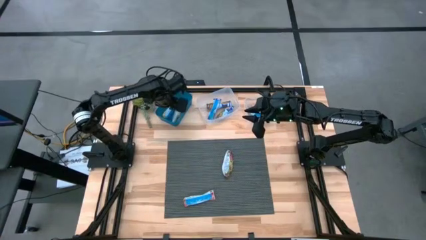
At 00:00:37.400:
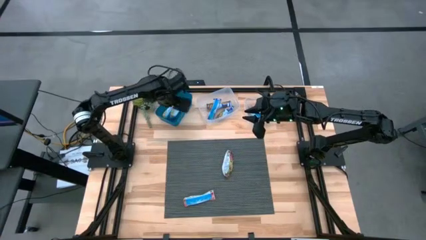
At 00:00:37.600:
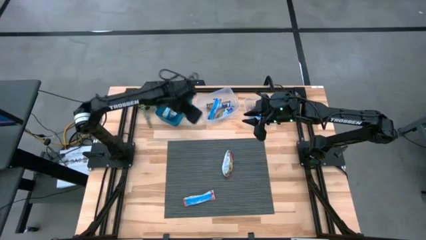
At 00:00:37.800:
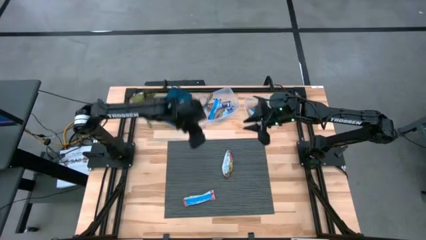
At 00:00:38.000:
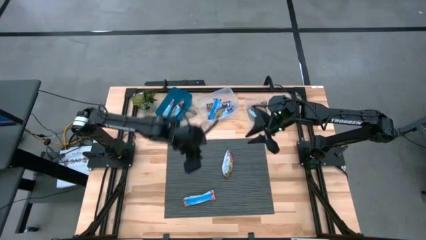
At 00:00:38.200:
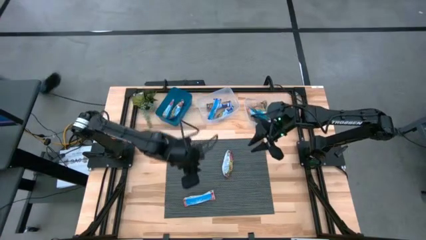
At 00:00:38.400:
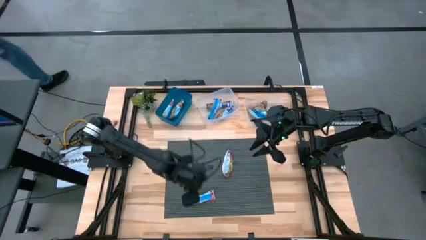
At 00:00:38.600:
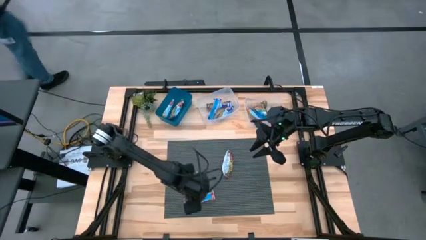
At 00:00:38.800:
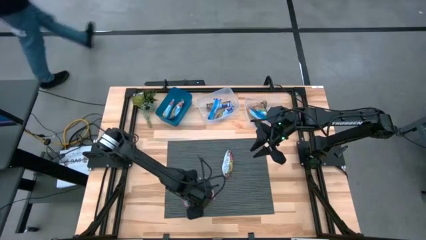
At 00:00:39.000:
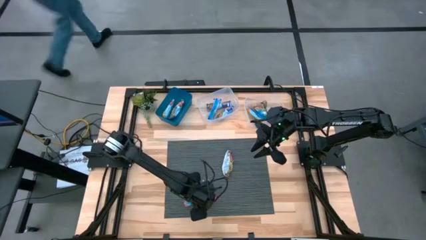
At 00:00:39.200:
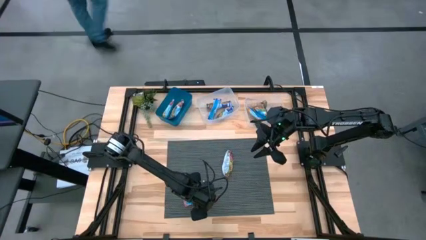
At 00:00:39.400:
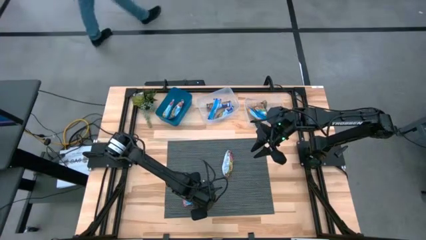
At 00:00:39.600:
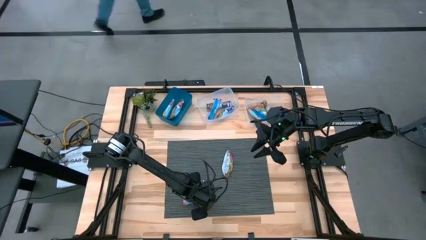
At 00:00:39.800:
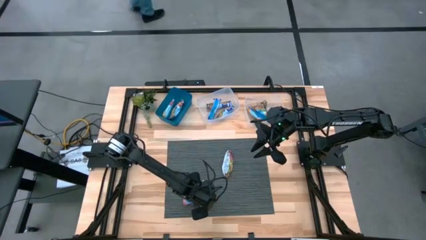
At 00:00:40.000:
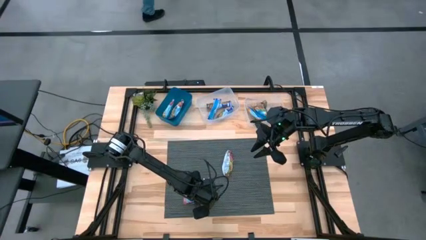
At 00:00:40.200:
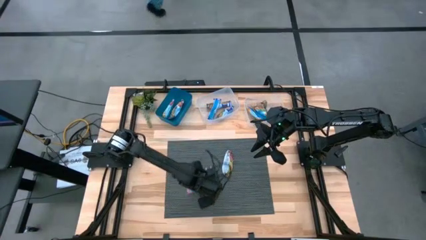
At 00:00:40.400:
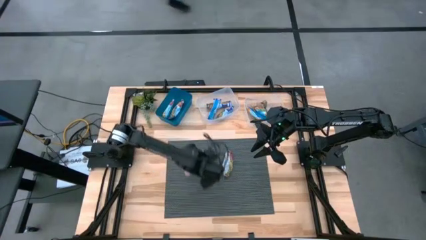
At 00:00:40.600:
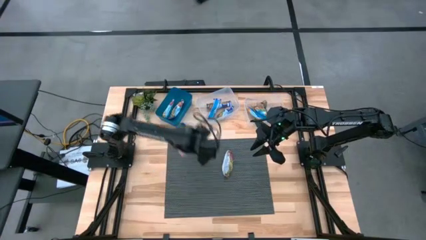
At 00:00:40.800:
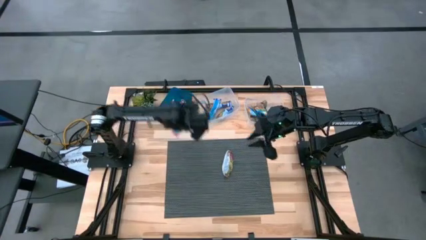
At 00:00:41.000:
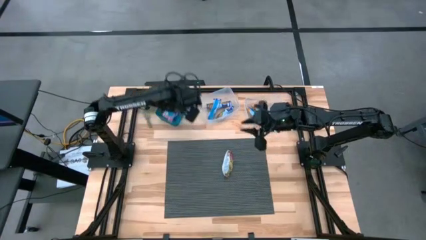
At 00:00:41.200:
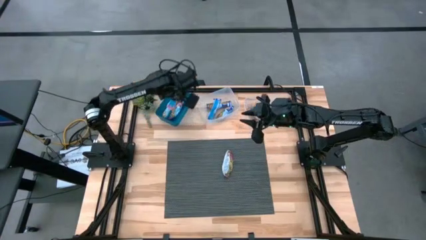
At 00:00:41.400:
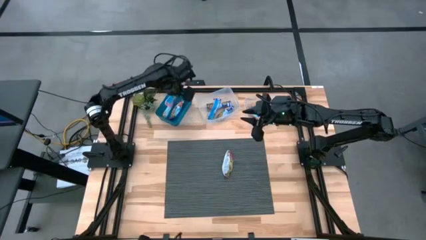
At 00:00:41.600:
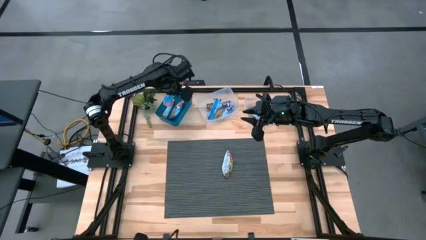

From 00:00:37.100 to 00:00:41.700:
Task: Pick and place Granola Bars by type
Put the red granola bar into the blue bin

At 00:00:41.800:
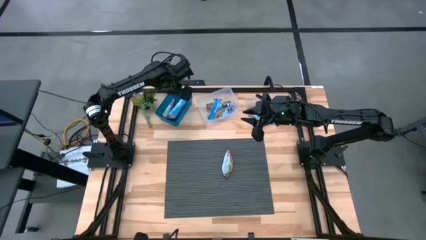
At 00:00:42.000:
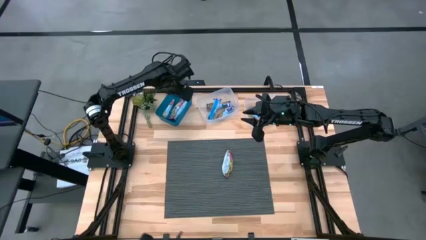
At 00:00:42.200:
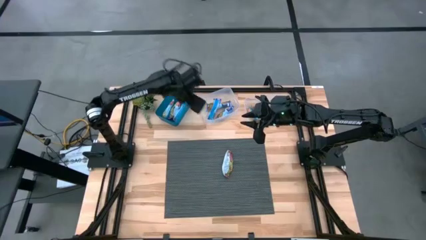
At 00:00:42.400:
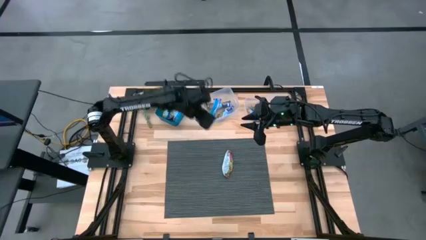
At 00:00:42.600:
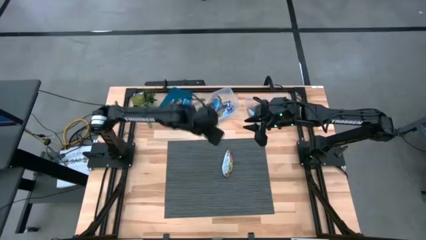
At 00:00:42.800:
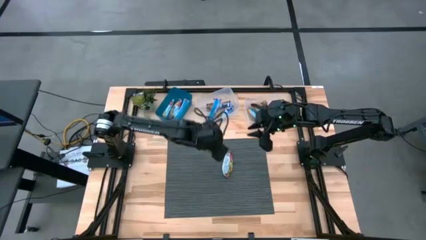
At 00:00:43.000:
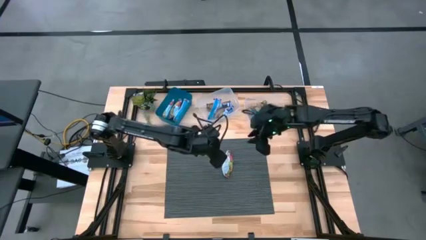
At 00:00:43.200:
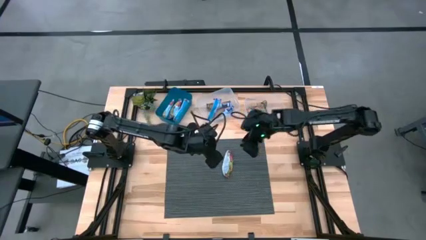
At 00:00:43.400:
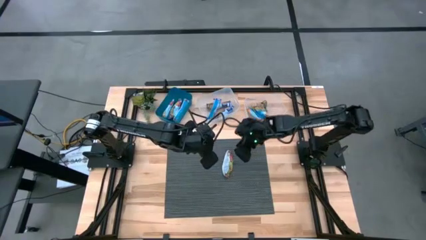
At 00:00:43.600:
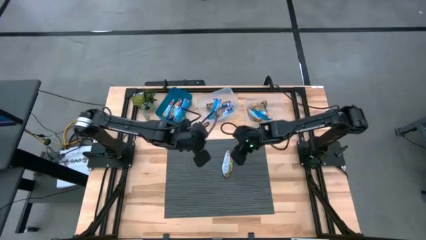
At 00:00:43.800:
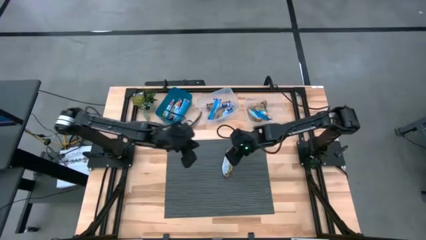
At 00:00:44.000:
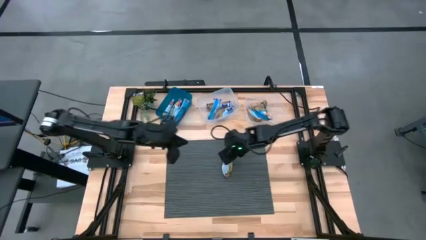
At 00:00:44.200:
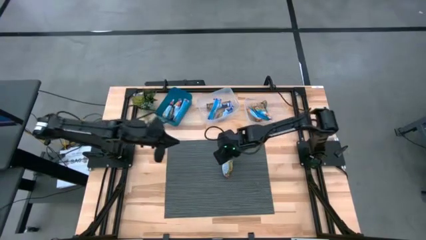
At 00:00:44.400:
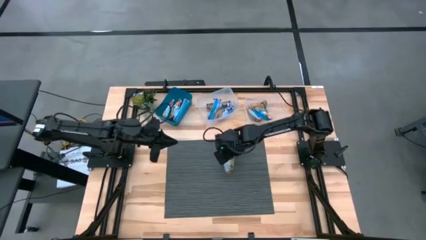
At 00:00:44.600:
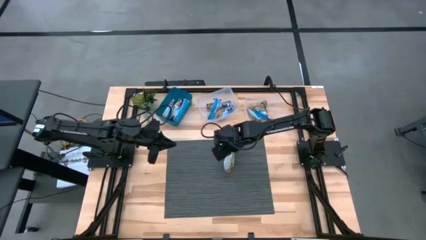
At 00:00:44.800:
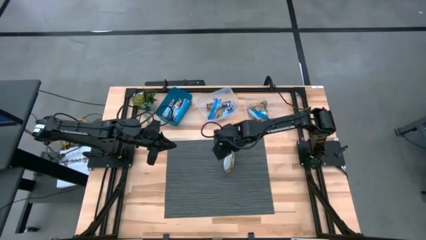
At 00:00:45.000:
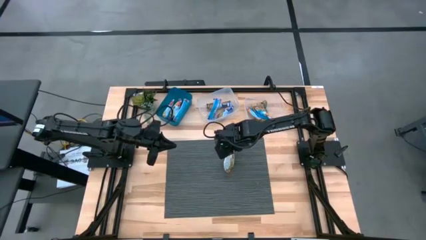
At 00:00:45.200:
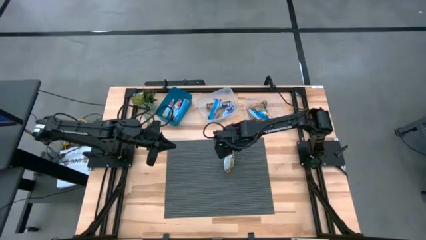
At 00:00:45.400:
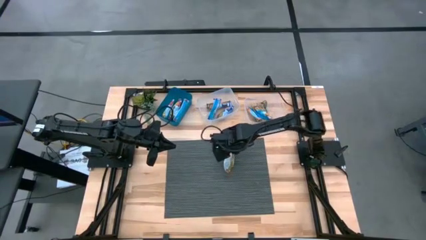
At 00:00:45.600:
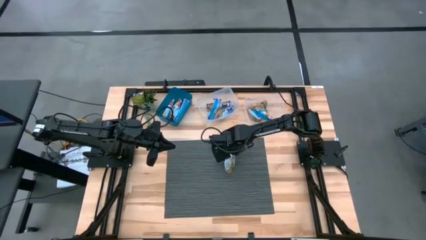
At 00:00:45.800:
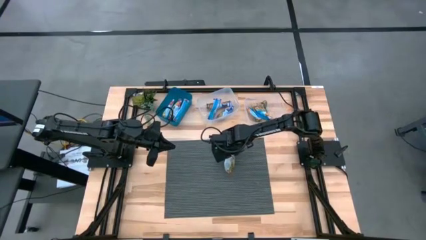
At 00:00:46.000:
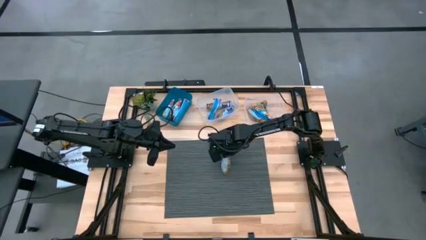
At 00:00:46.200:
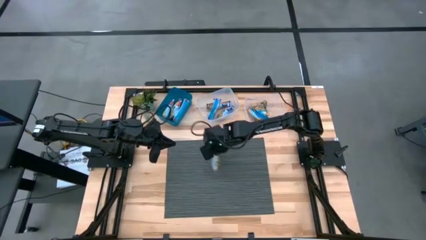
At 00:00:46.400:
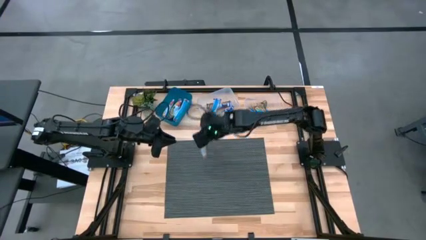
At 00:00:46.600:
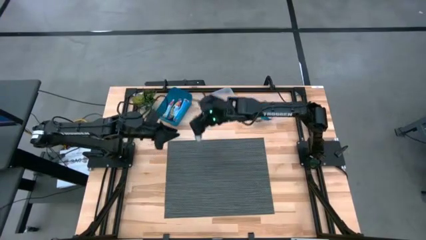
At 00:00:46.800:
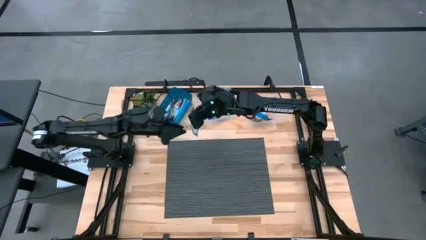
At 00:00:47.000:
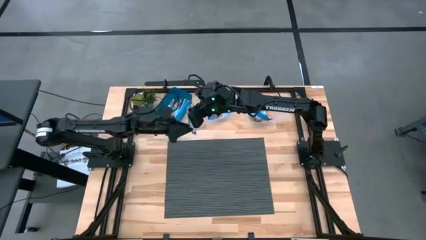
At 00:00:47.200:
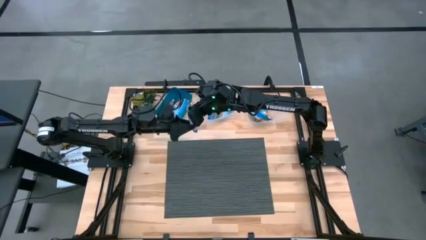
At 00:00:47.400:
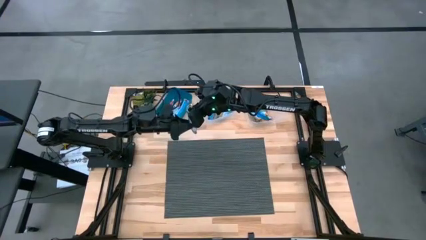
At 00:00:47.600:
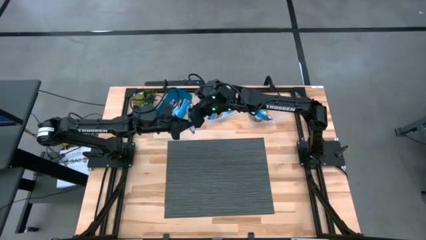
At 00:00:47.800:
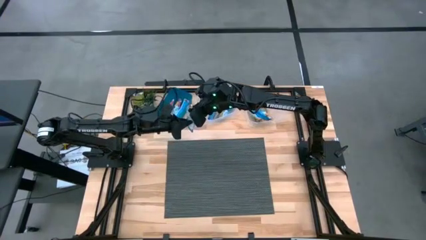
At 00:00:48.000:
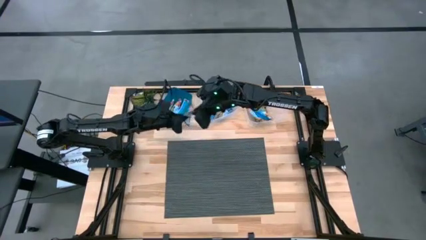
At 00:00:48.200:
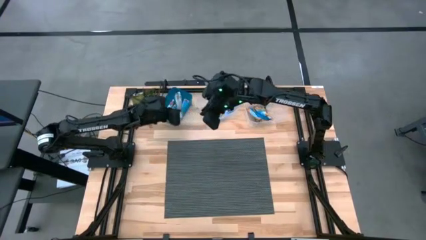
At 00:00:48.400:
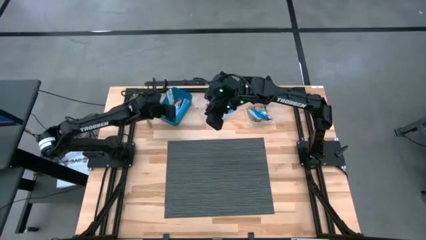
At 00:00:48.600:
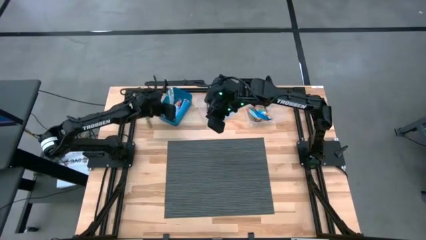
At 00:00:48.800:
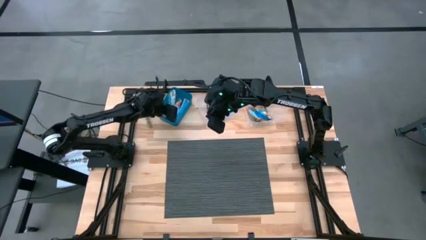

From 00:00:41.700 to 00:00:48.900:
Put the red granola bar into the blue bin

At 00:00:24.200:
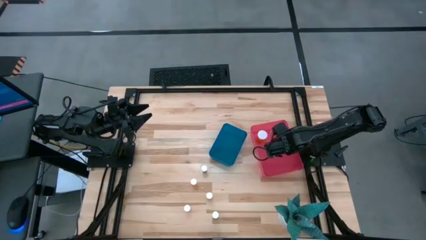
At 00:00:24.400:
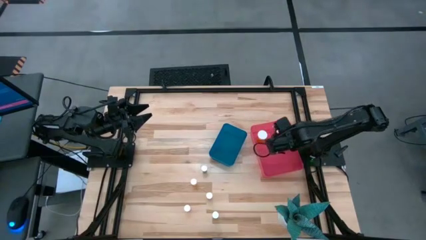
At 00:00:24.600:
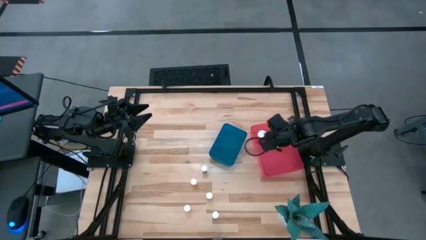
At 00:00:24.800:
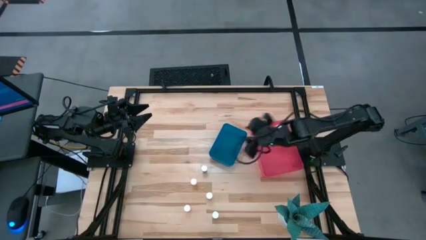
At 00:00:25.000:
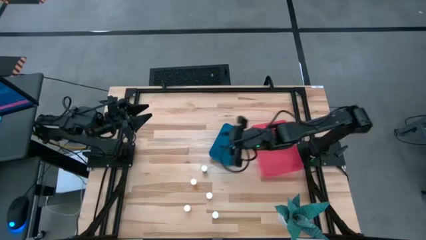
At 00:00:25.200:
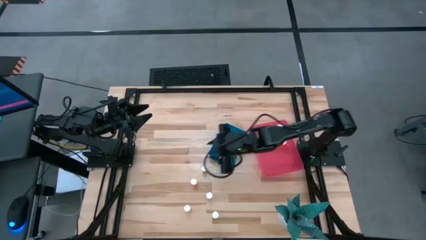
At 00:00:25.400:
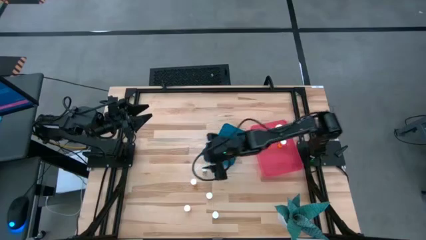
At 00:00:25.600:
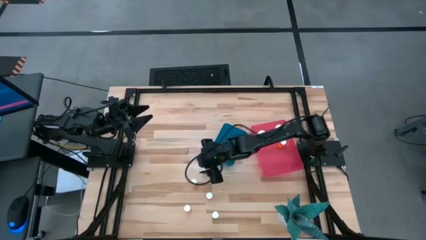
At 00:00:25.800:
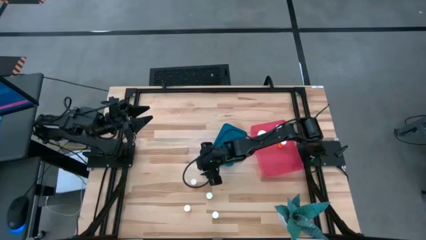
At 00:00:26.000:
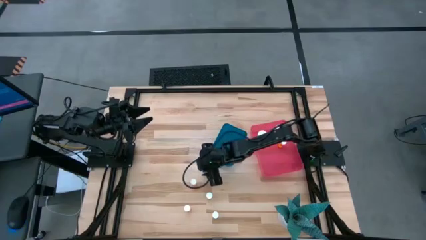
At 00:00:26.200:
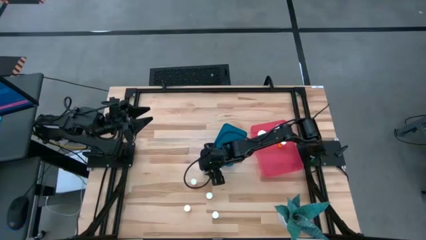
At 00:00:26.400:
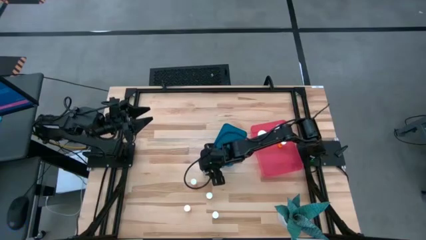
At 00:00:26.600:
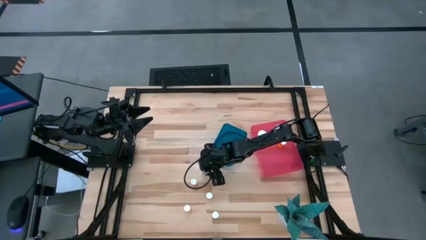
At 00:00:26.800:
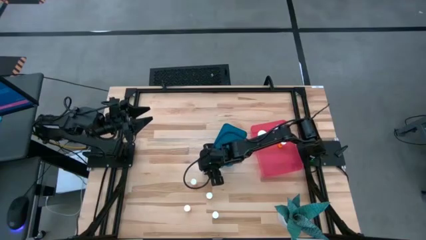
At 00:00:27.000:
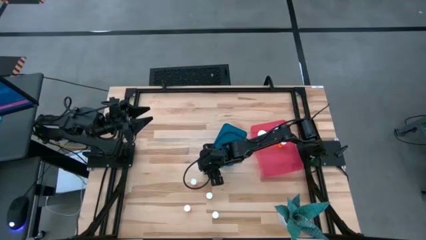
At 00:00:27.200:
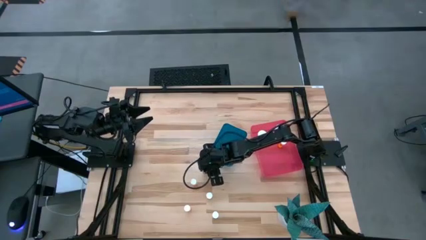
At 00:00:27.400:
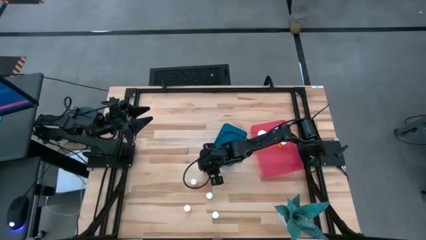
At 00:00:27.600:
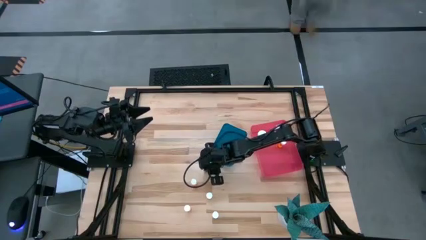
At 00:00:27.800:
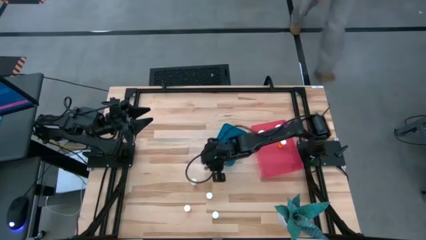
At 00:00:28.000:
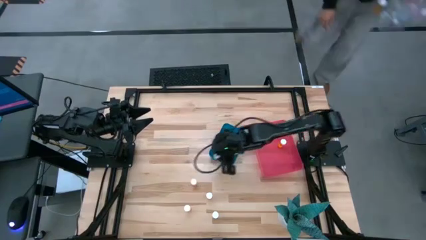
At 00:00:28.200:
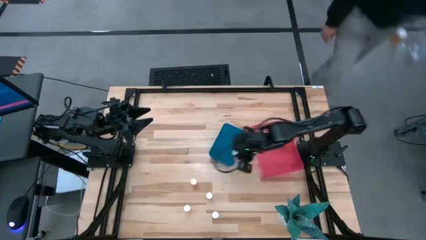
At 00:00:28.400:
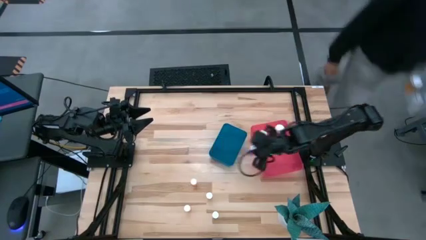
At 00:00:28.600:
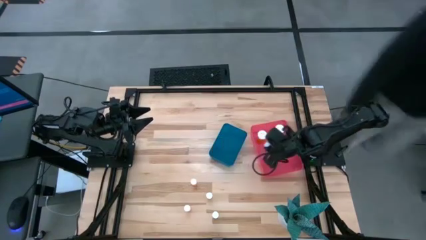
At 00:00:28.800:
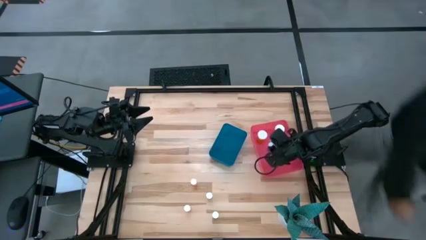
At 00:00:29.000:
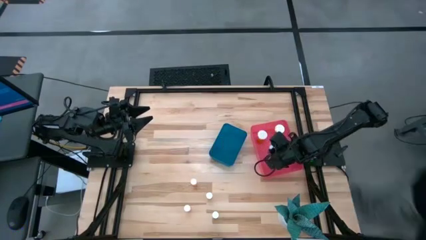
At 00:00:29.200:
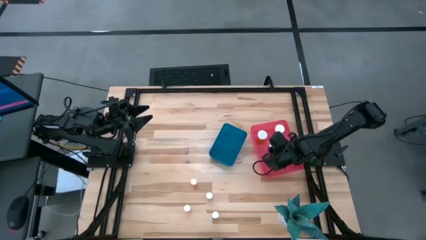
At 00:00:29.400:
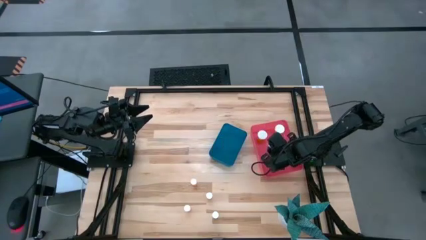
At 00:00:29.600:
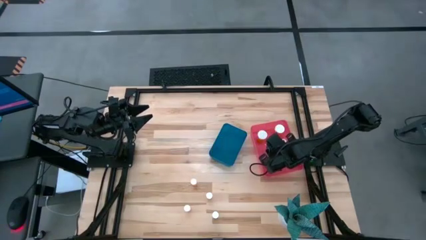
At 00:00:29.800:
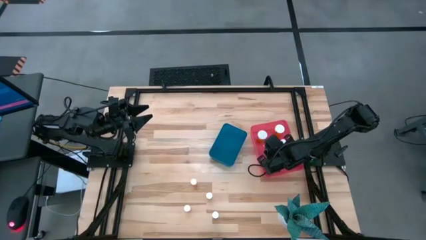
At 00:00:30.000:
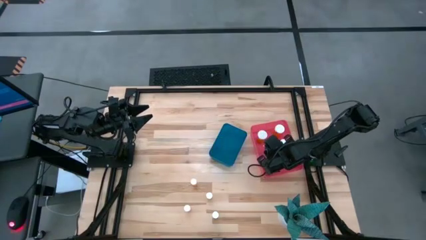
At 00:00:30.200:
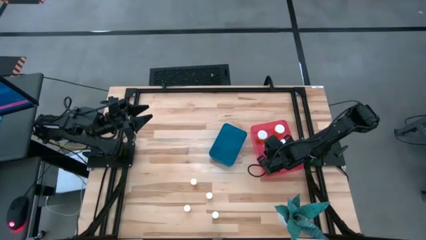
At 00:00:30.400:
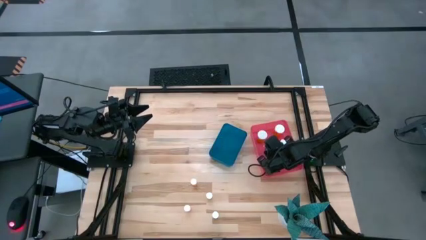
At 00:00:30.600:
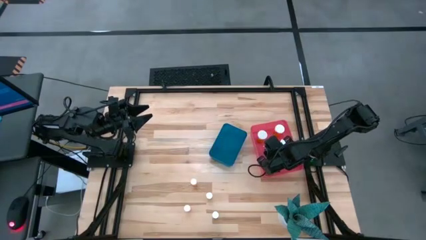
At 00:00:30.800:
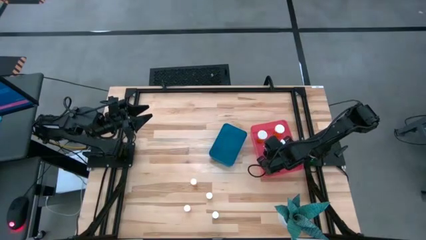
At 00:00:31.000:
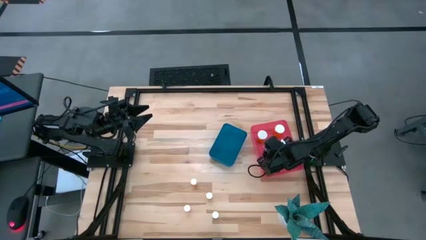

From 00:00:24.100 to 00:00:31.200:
Task: Pick and place medicine bottles into bin by pill shape (circle, oval)
Put the blue capsule bottle into the pink bin
